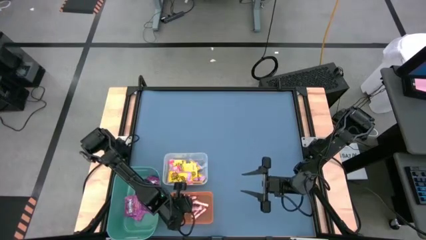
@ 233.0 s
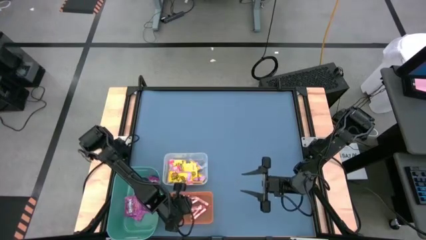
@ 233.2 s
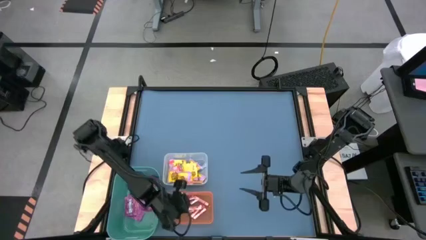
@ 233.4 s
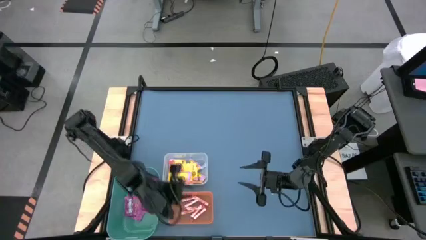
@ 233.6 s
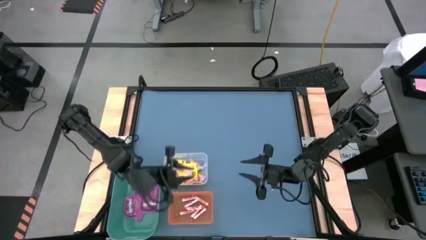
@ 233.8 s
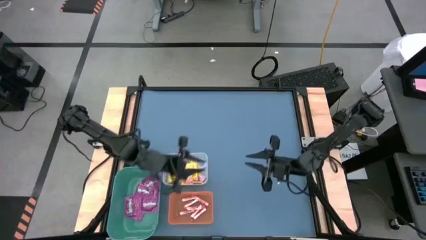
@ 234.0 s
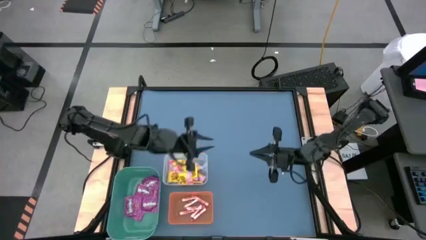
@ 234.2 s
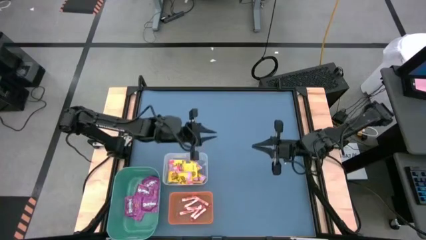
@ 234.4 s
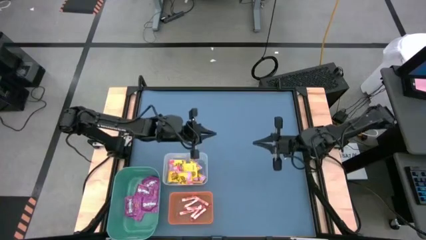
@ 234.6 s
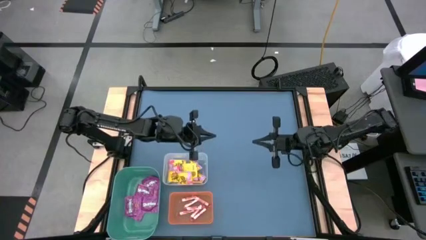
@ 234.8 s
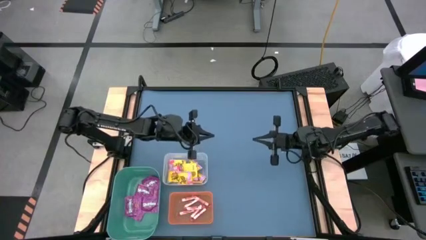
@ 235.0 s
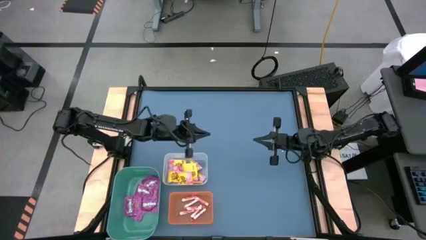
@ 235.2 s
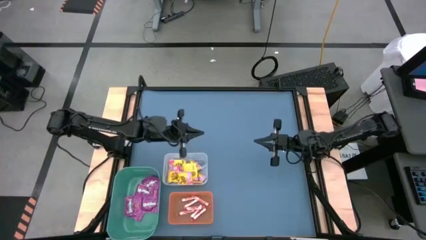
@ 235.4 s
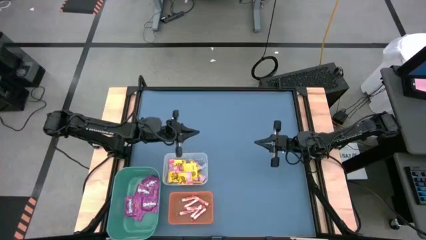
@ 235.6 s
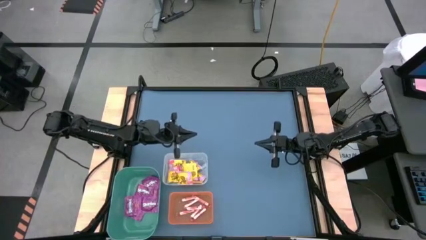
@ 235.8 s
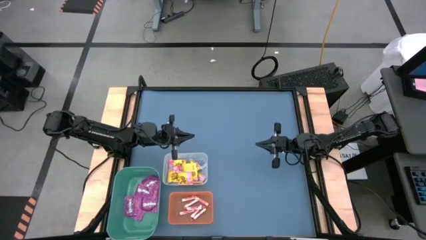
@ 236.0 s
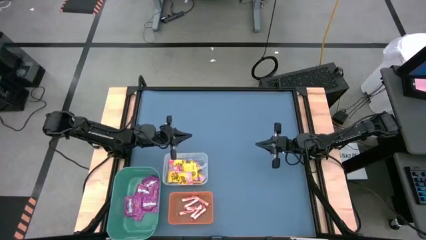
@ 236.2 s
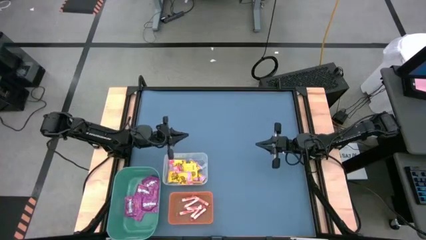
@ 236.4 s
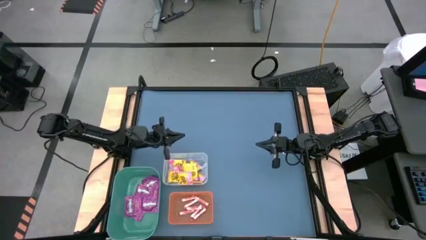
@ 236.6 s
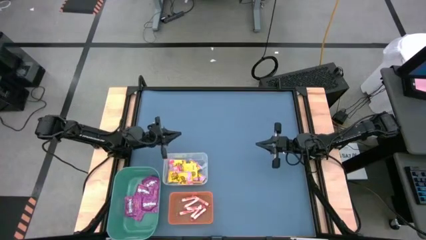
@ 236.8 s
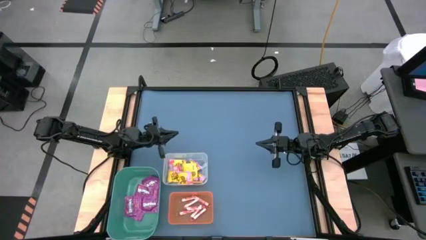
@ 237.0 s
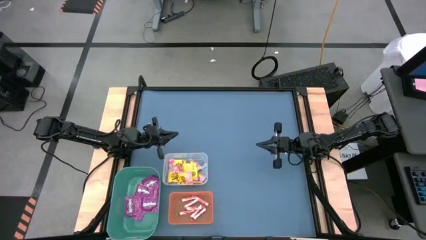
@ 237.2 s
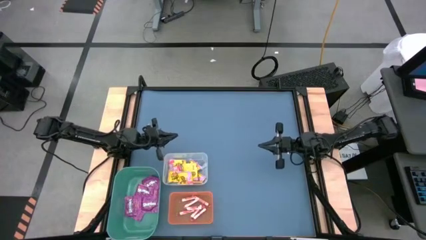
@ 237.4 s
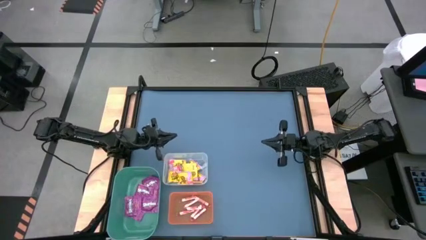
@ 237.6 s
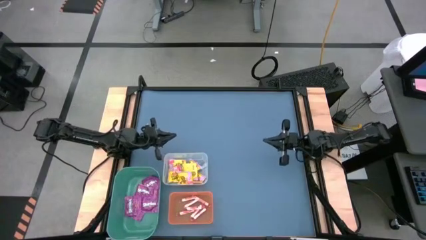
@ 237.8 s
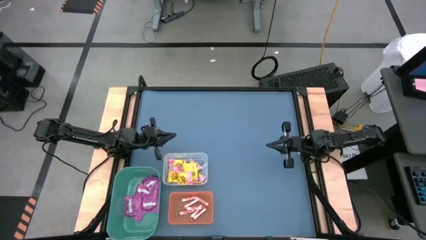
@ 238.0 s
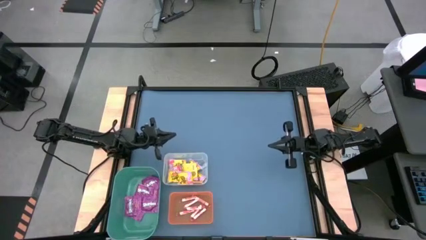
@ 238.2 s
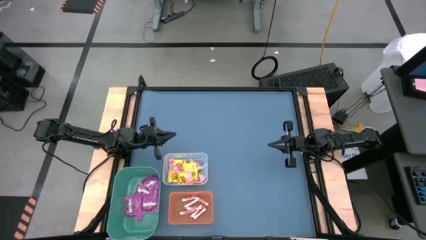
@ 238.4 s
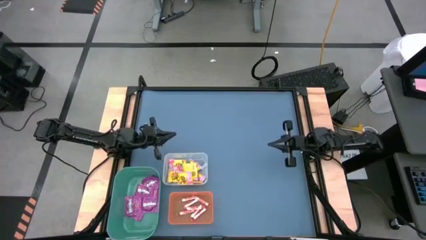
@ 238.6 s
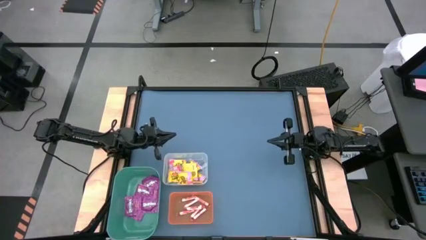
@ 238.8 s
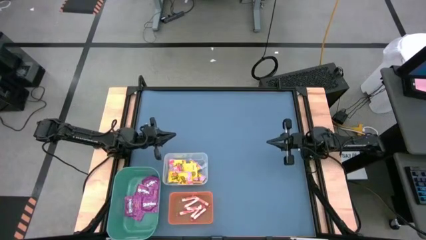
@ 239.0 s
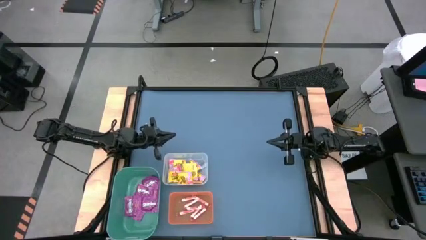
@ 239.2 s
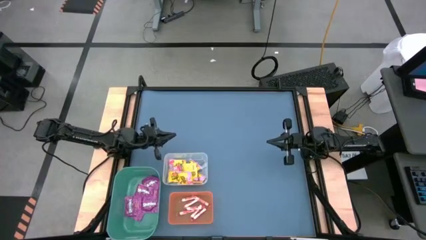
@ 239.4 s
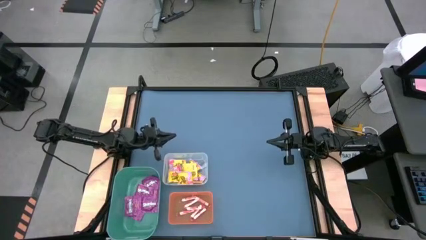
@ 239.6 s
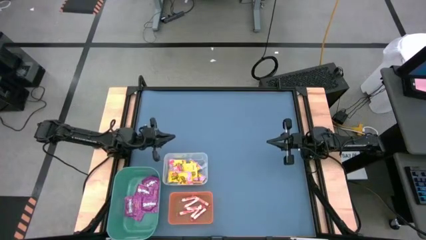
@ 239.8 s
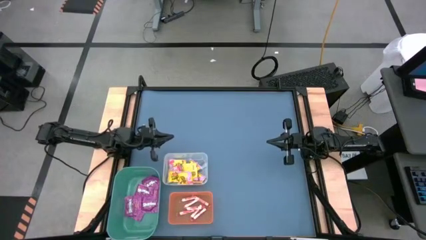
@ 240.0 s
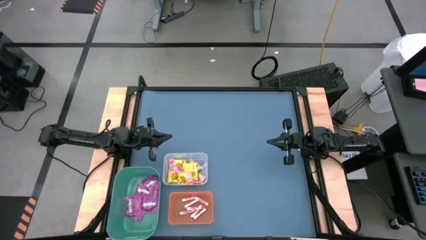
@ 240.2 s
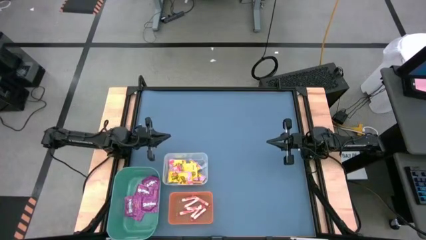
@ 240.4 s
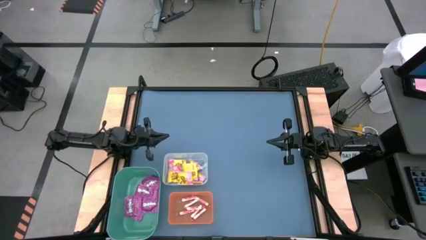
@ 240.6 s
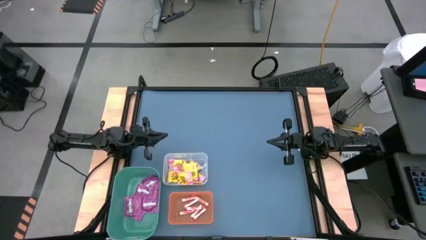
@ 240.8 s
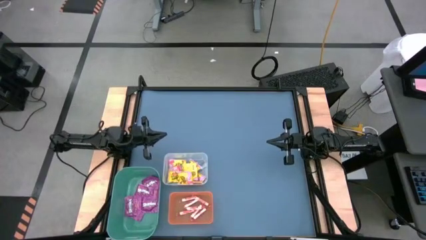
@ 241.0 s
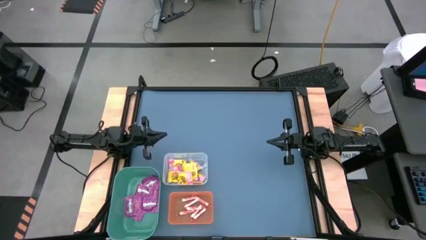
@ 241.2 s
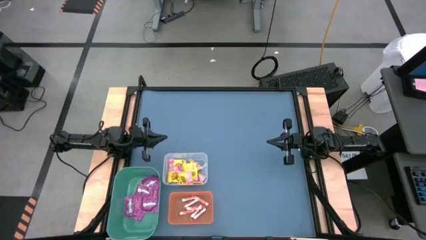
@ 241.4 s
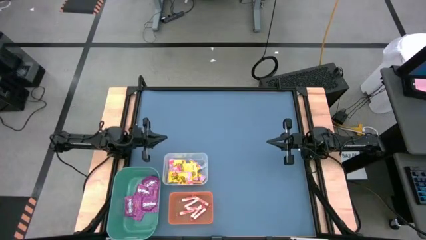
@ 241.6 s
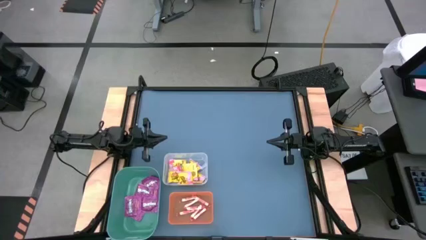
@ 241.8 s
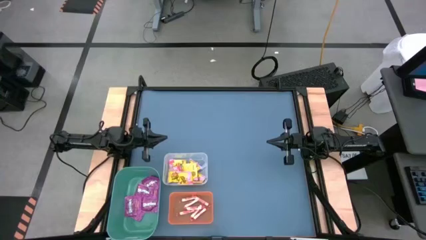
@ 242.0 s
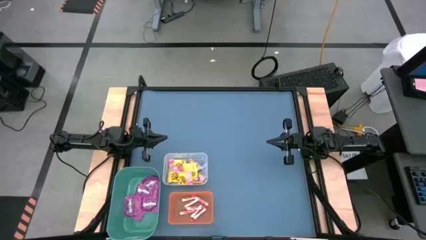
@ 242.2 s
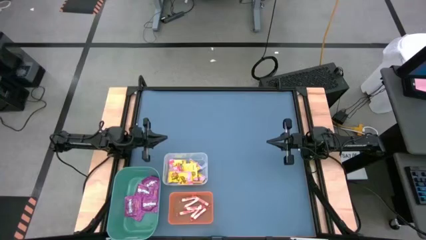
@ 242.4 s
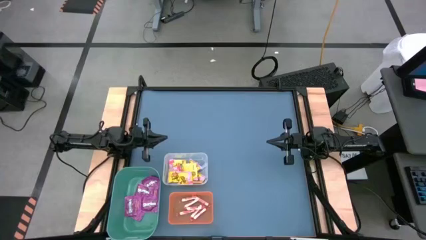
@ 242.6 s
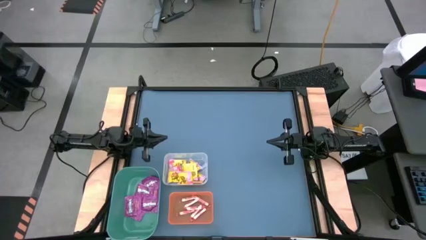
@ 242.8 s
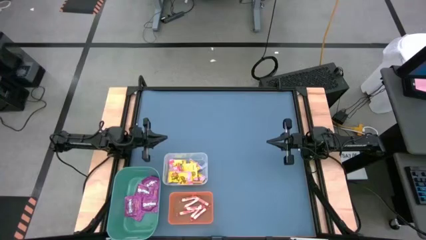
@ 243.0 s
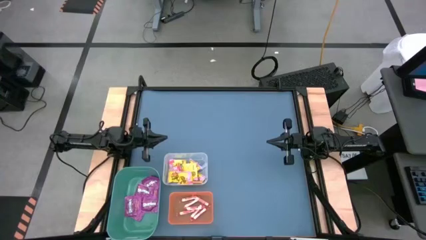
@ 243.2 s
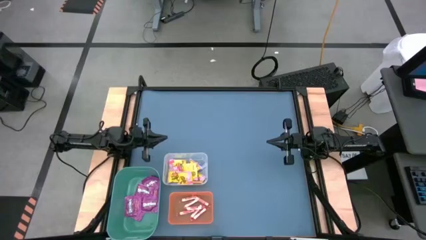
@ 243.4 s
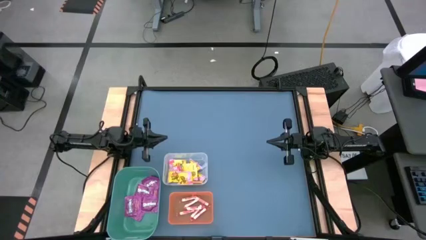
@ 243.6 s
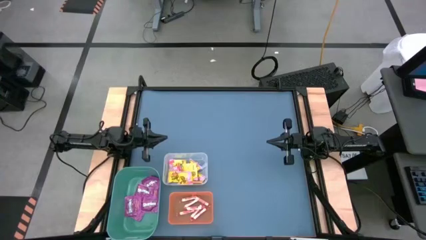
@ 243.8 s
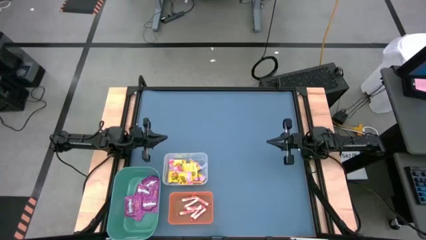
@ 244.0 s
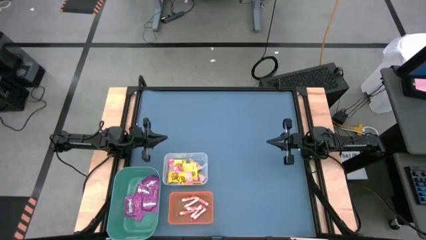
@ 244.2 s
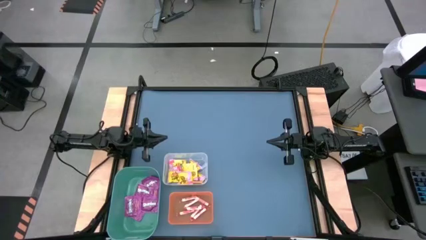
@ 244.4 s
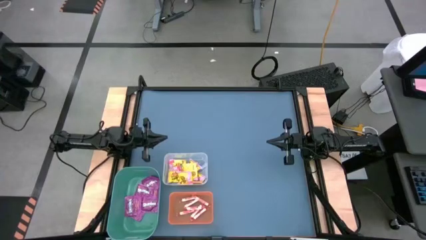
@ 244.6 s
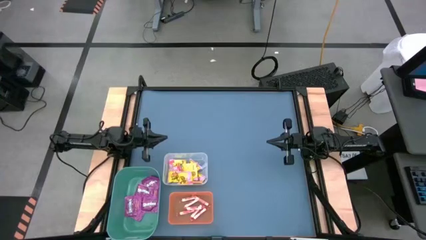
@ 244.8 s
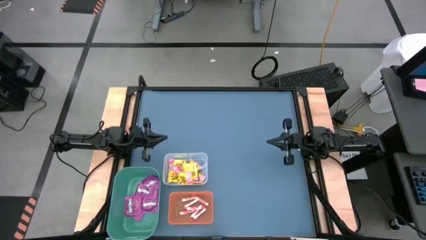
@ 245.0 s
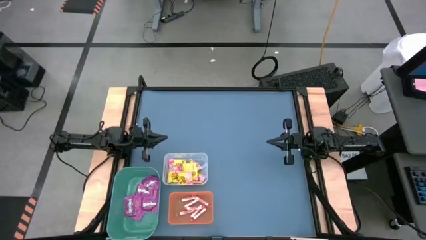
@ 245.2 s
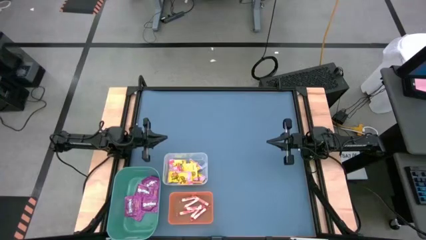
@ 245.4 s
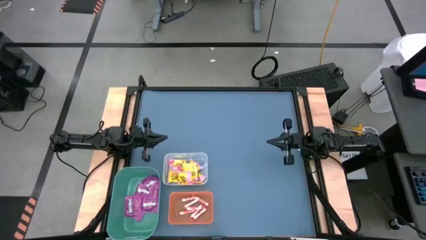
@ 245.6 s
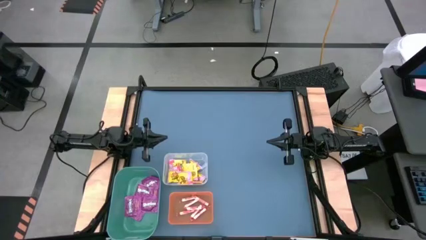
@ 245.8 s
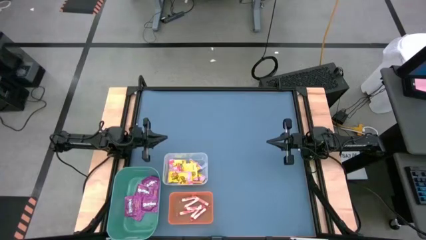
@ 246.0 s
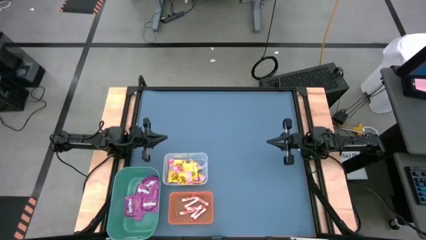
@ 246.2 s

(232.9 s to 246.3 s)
Task: Sort candy
Return to Home Position
